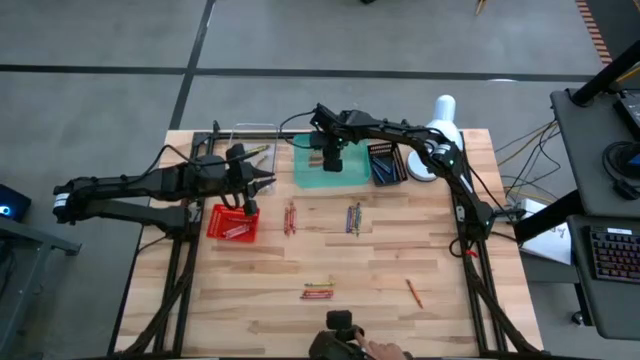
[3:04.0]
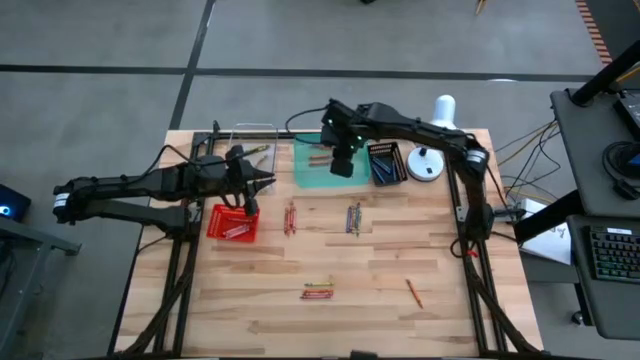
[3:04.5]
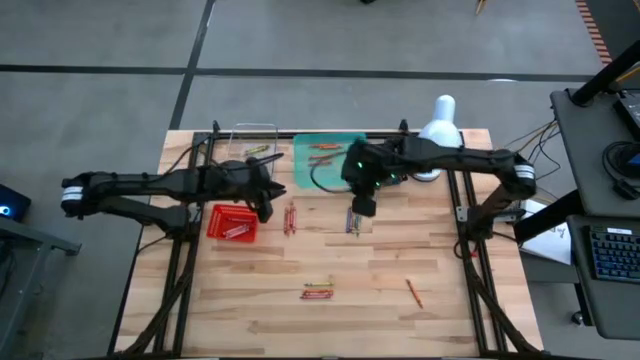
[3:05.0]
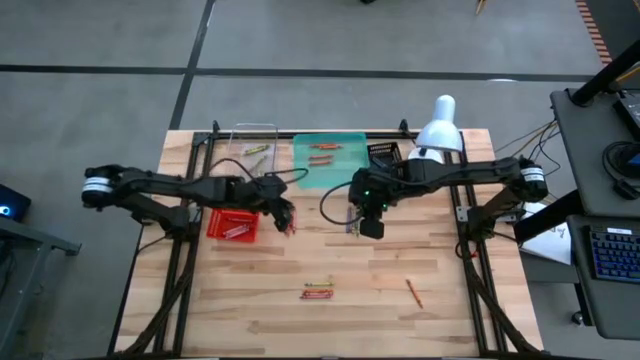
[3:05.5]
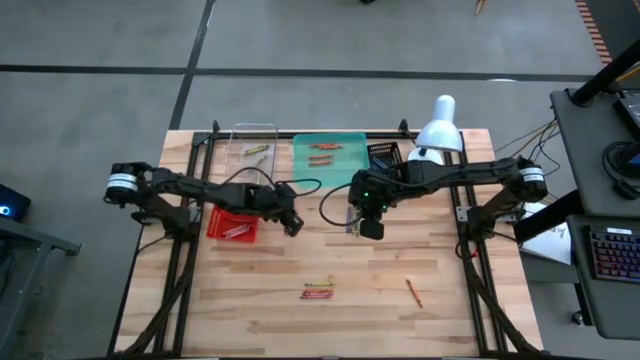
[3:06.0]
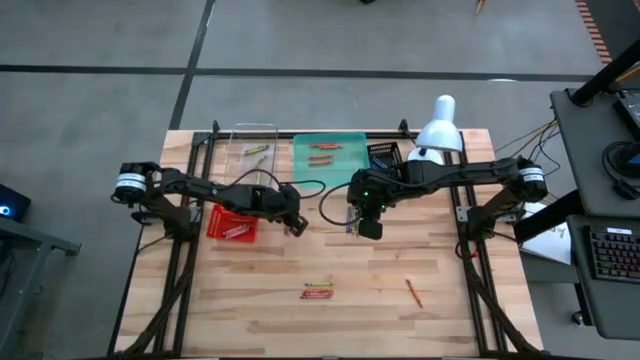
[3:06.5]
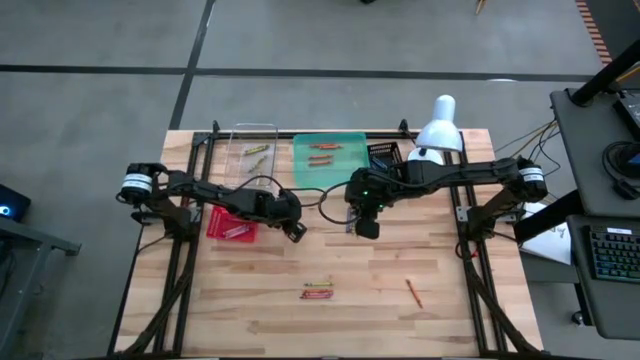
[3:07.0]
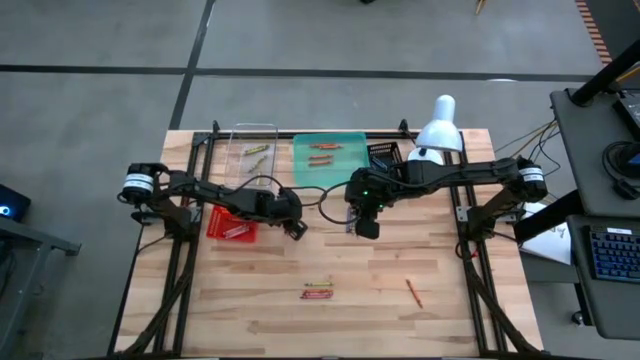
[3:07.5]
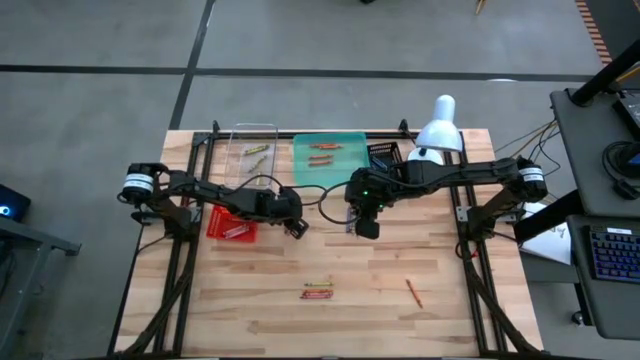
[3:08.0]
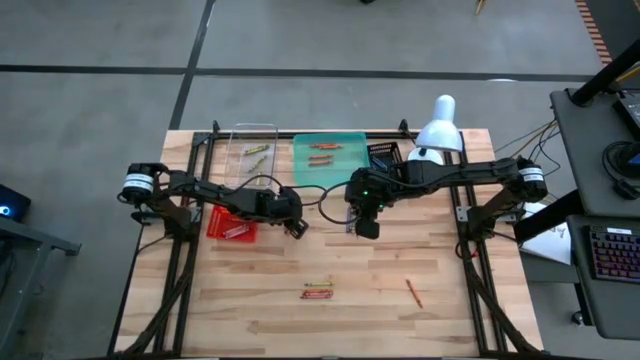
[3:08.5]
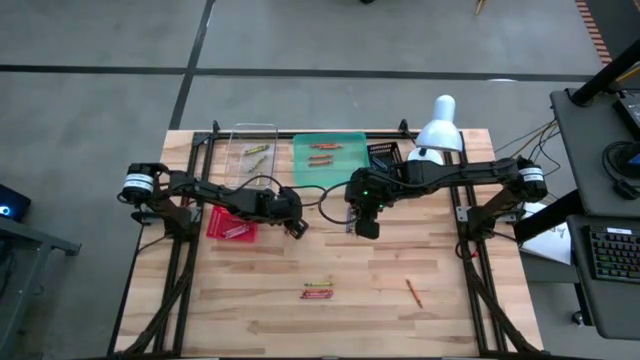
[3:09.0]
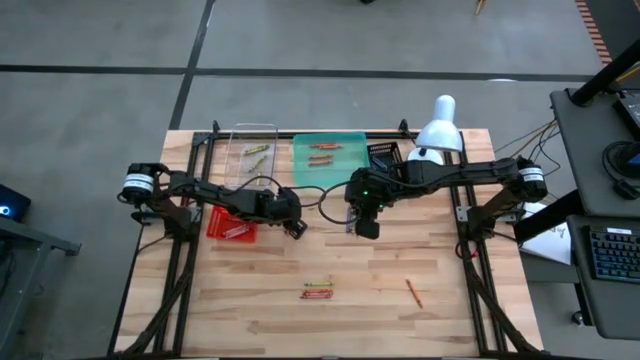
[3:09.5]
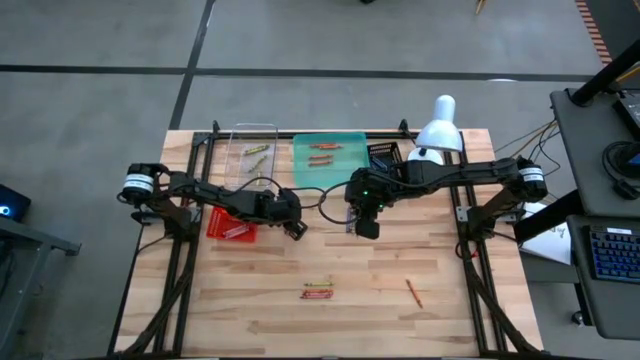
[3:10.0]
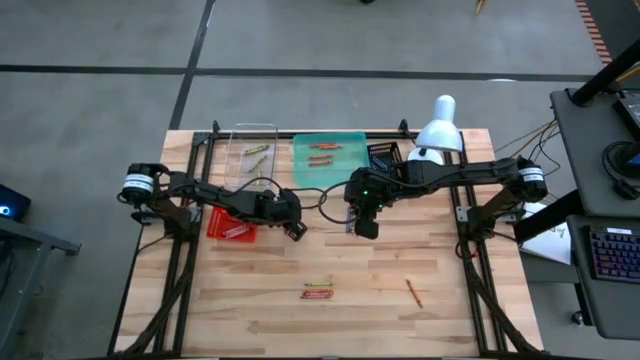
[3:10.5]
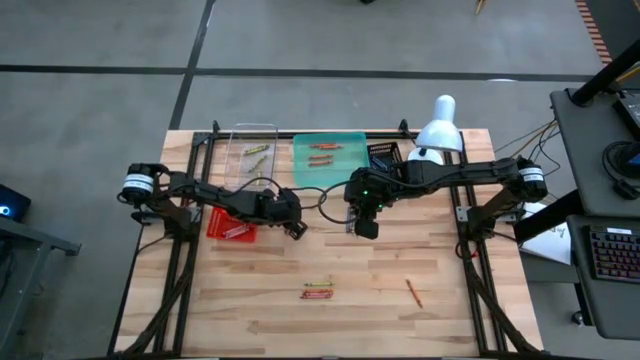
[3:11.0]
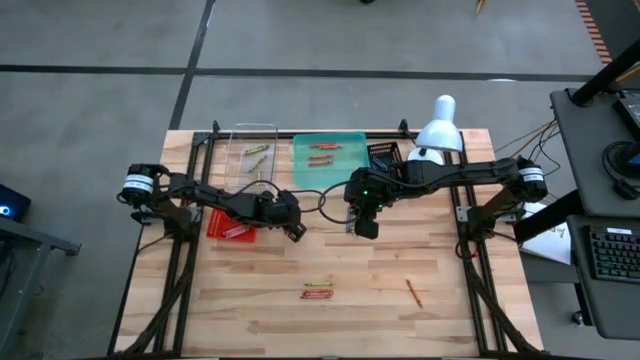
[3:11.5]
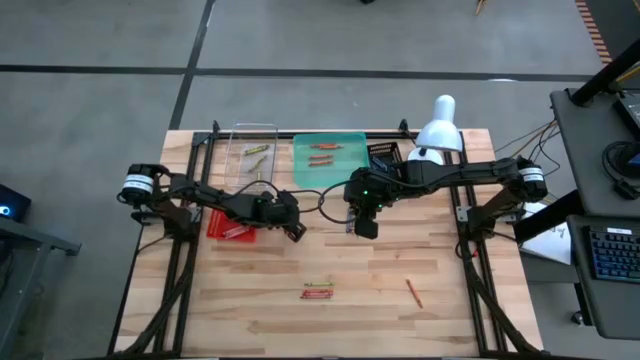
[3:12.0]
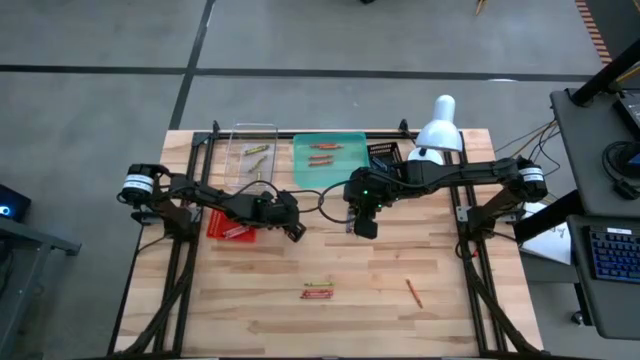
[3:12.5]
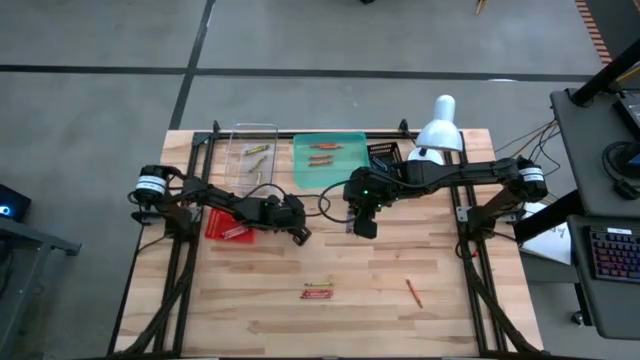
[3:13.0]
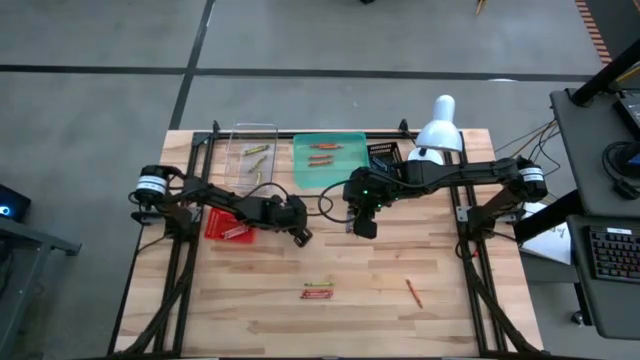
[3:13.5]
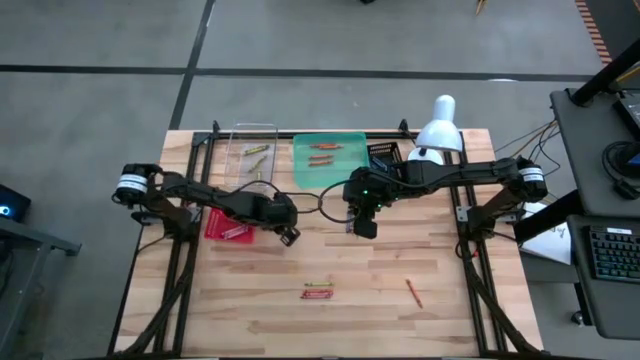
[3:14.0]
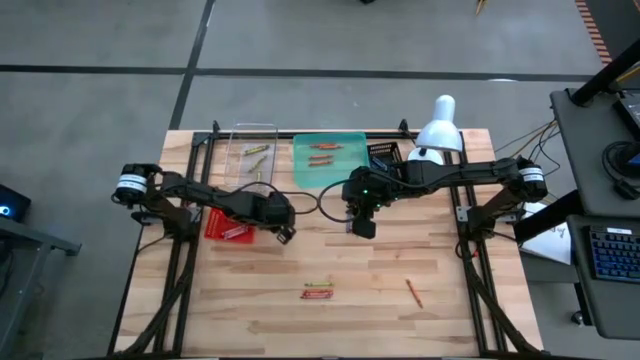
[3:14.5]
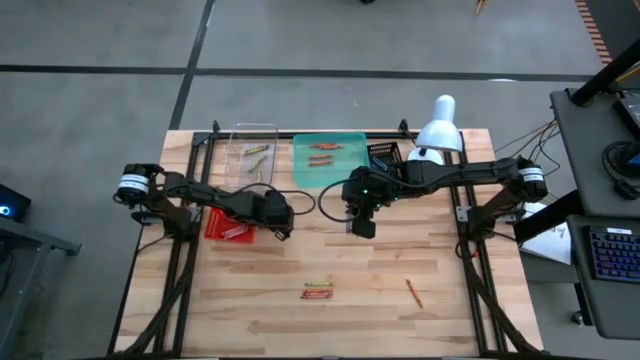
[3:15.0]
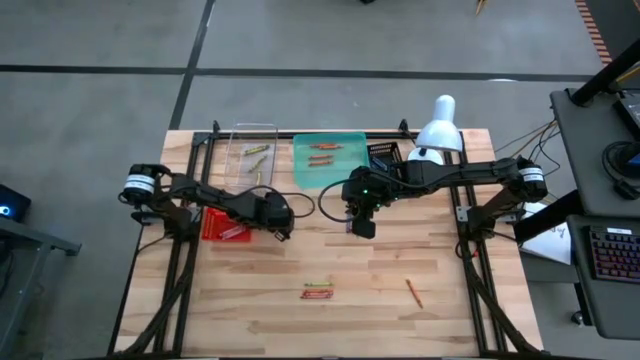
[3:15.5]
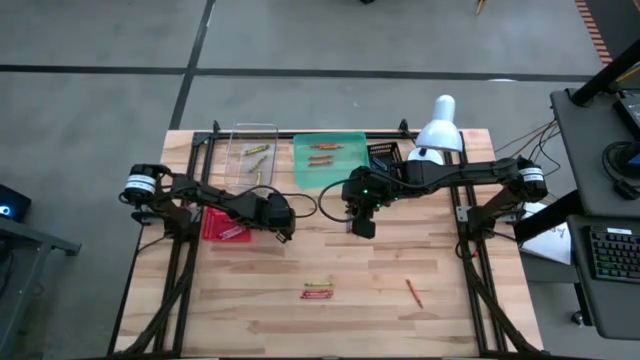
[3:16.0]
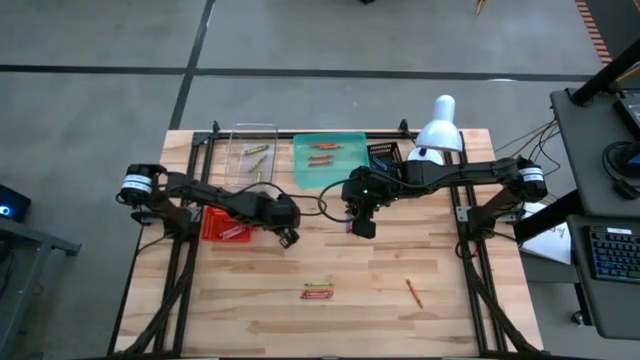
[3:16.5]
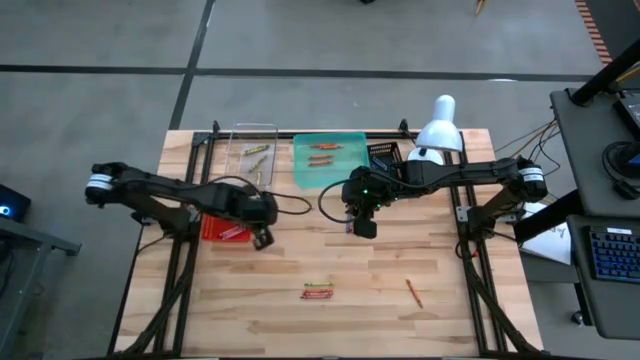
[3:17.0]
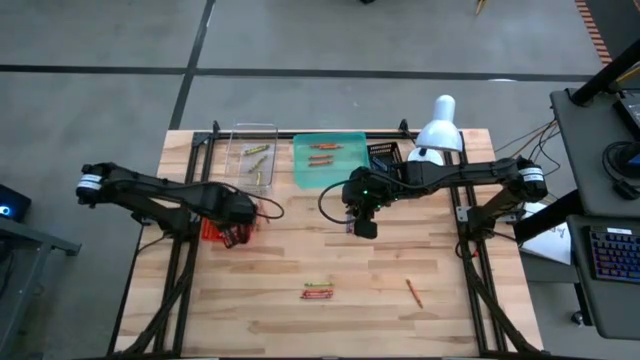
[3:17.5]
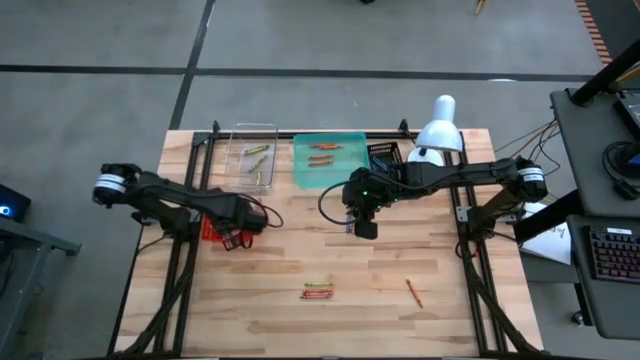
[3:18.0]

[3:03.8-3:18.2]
Task: Sort crayons
Put the red crayon into the red bin

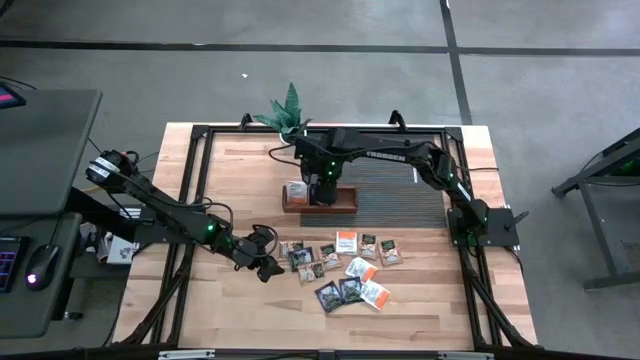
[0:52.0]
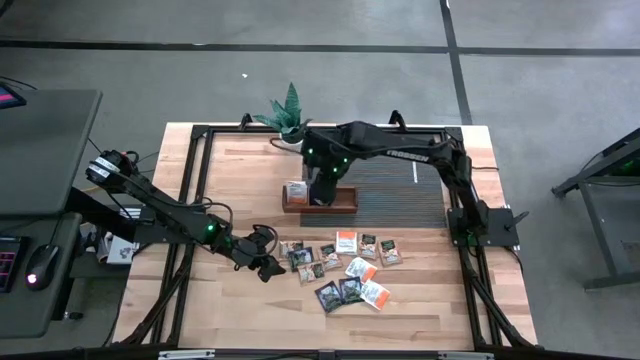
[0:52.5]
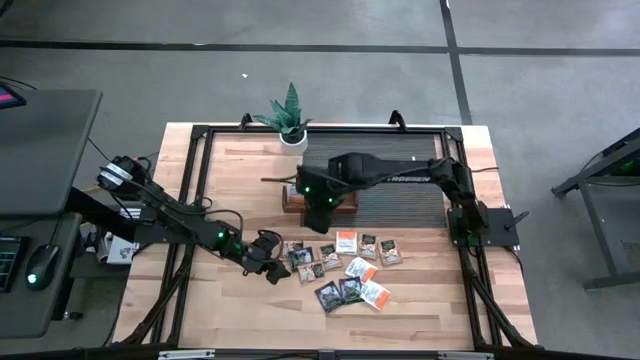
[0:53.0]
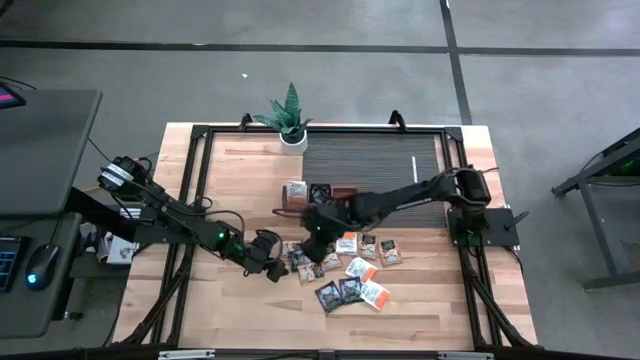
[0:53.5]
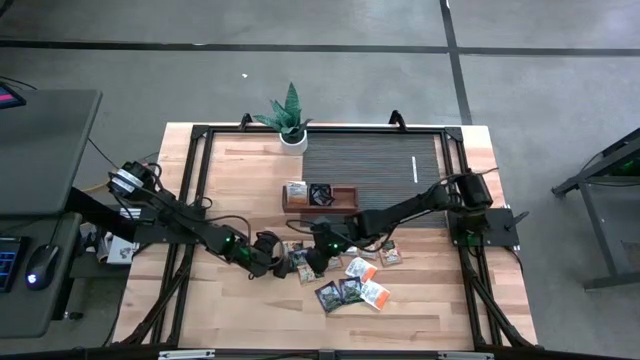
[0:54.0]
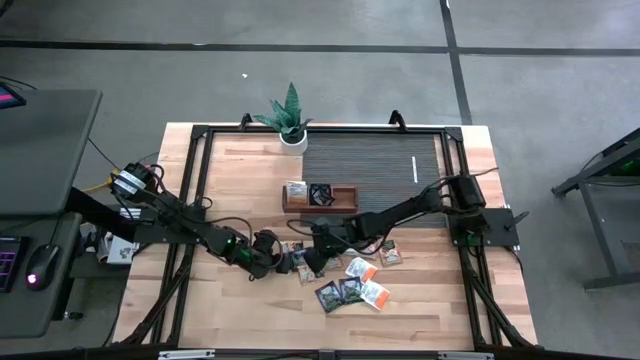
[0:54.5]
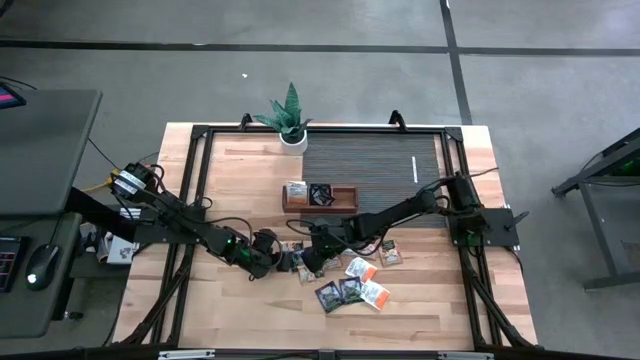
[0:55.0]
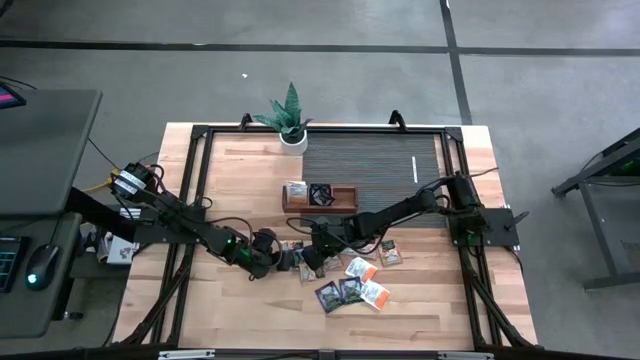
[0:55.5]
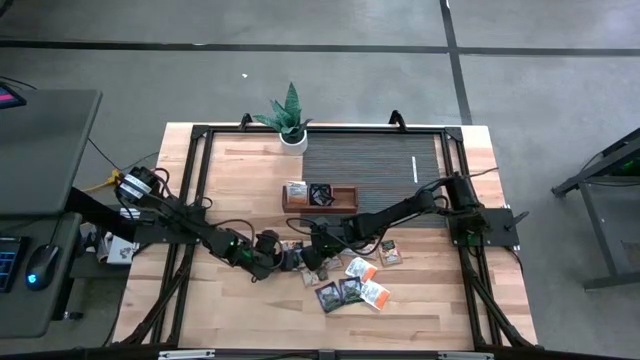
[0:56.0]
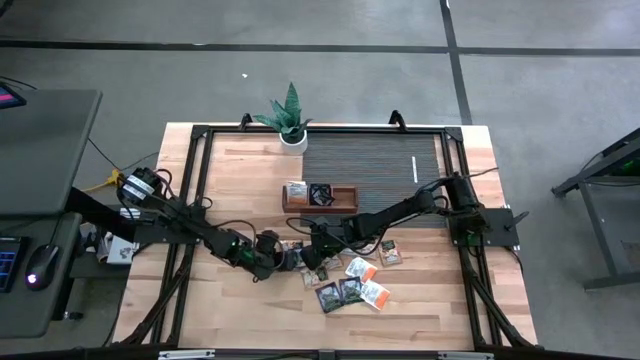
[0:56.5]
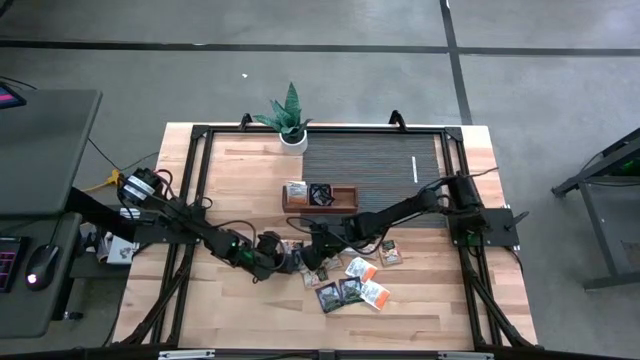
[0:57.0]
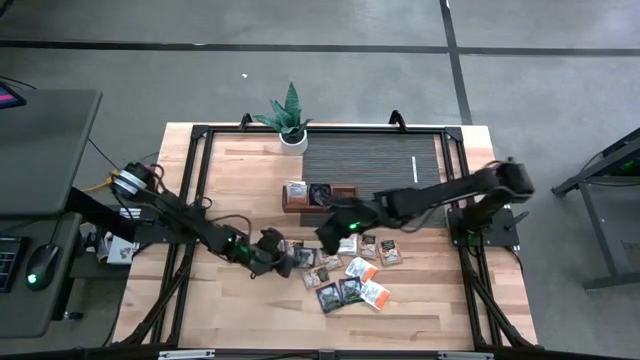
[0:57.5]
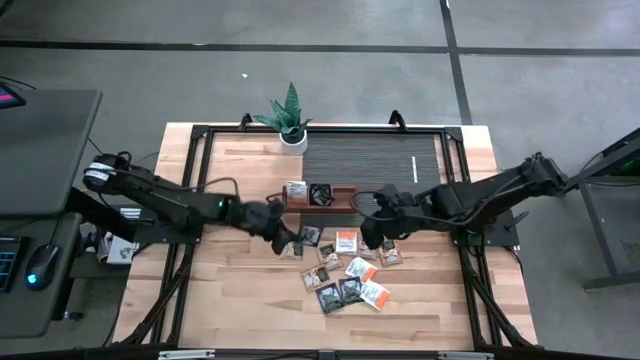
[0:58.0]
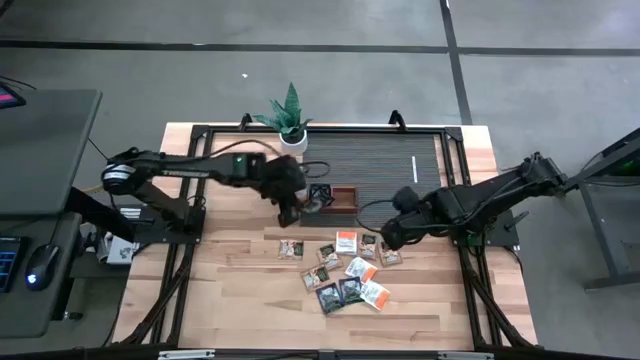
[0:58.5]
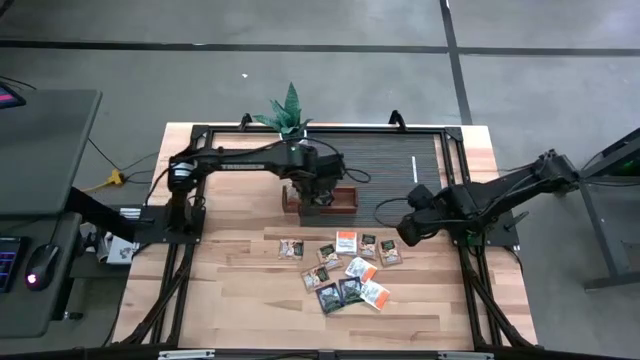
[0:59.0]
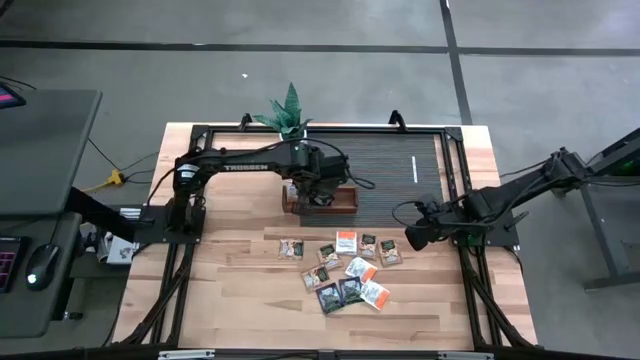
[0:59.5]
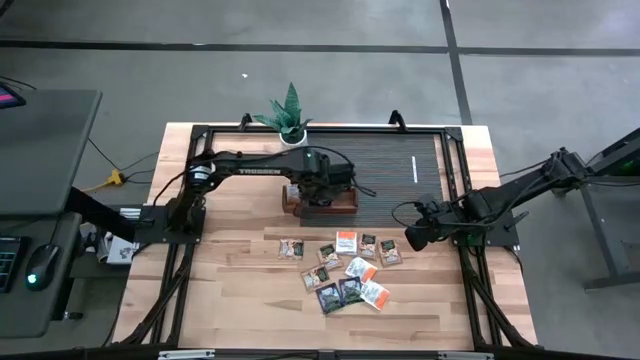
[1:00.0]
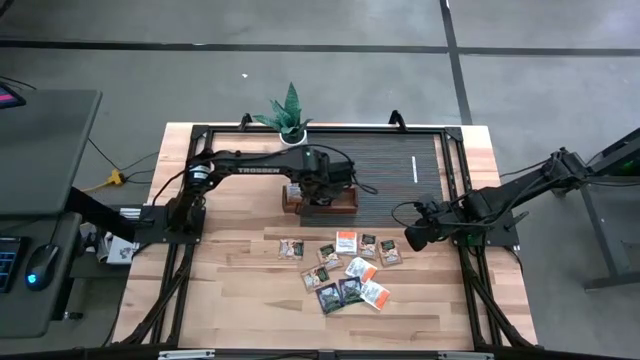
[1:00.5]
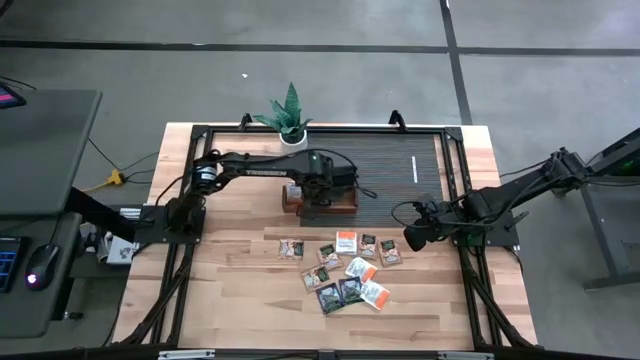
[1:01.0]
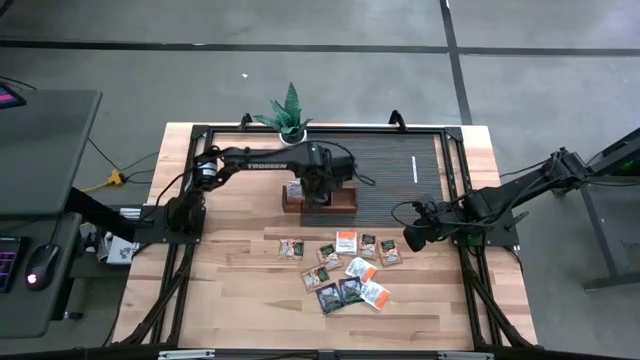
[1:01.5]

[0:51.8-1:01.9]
Task: Pick & Place Tea
Put the blue tea bag into the middle section of the wooden organizer
